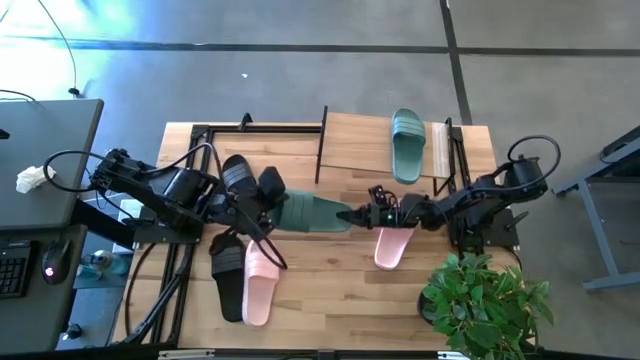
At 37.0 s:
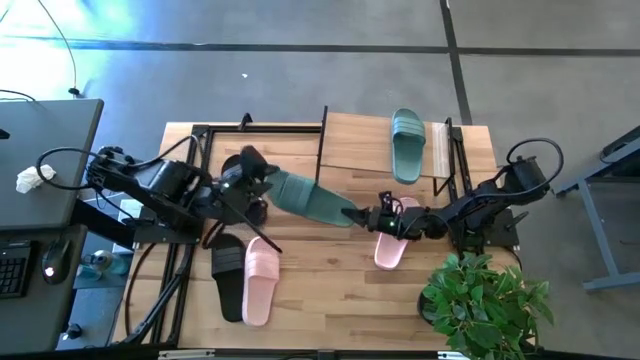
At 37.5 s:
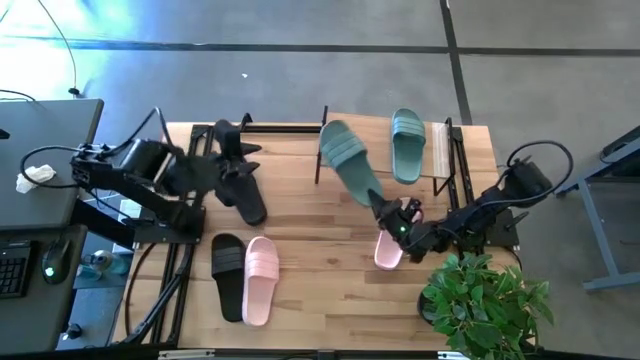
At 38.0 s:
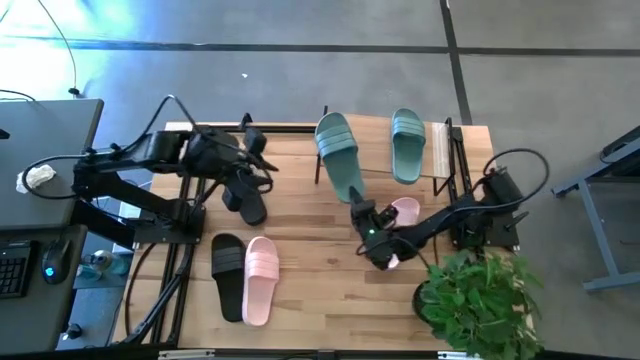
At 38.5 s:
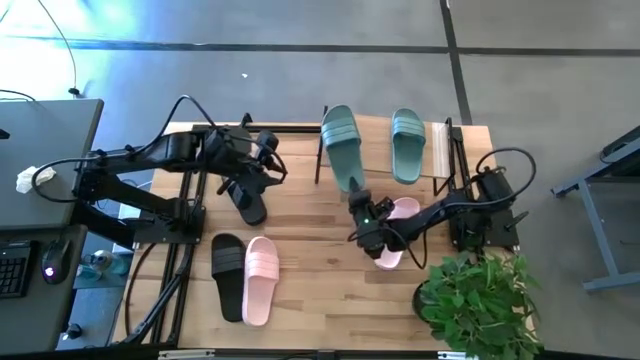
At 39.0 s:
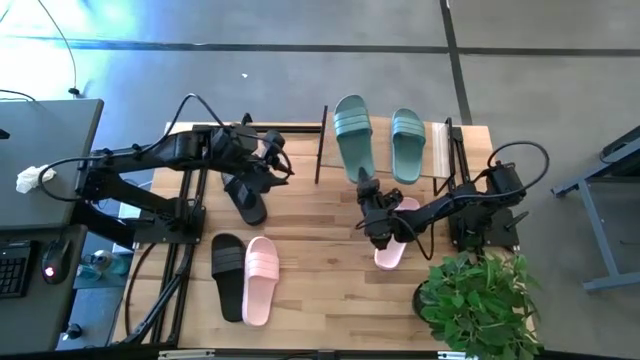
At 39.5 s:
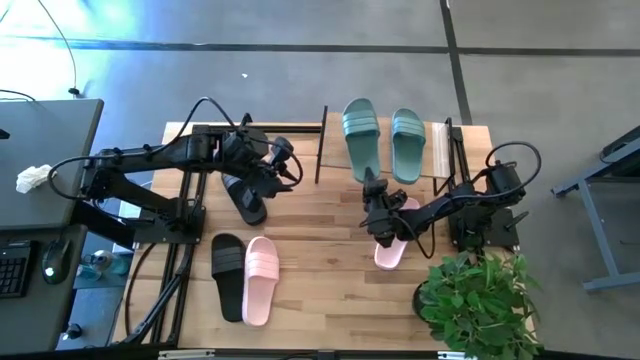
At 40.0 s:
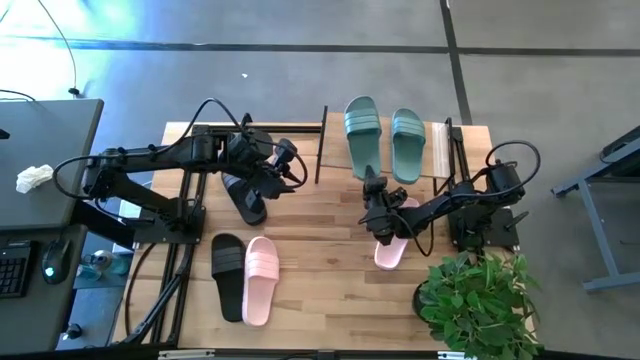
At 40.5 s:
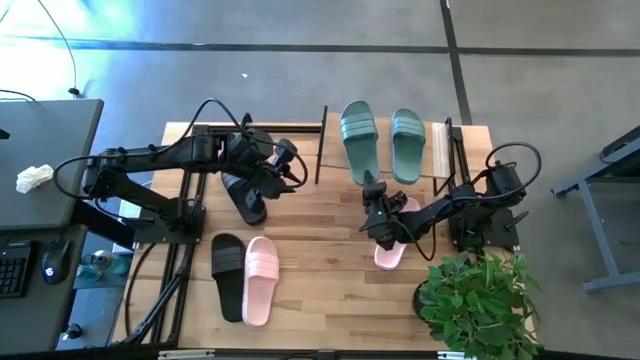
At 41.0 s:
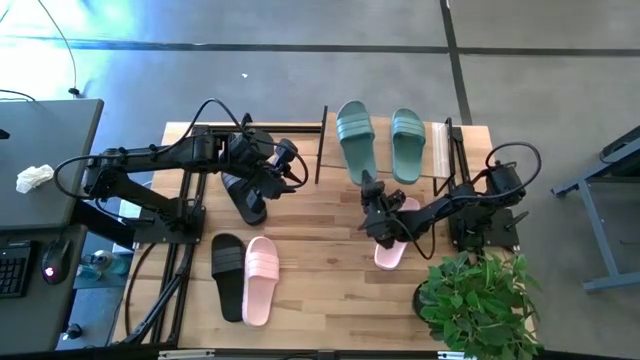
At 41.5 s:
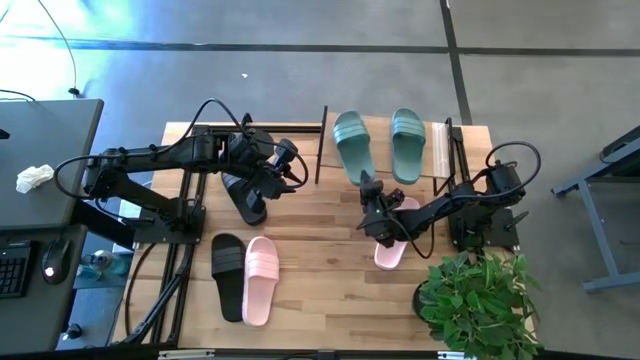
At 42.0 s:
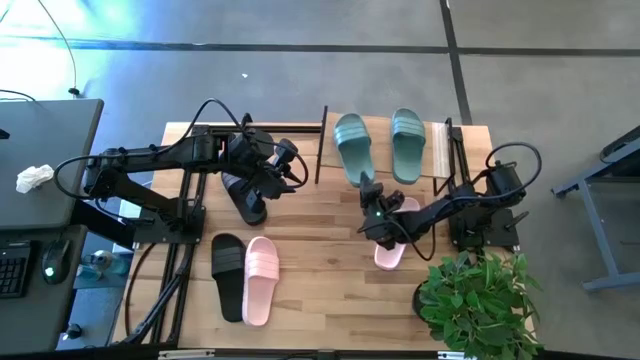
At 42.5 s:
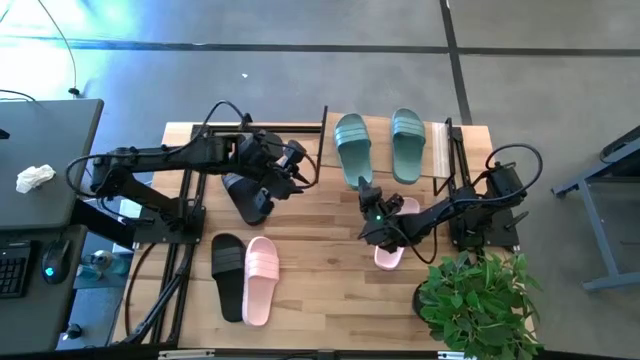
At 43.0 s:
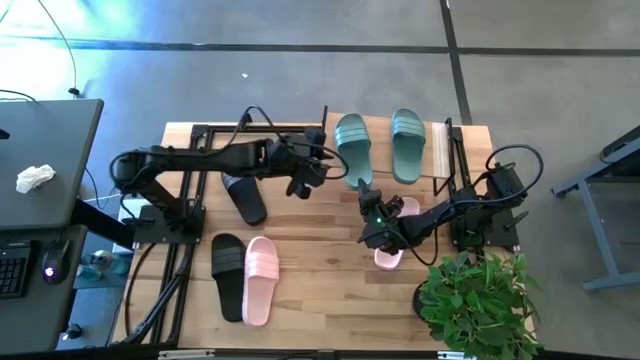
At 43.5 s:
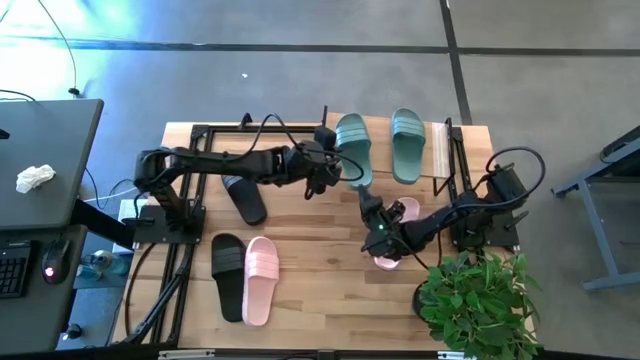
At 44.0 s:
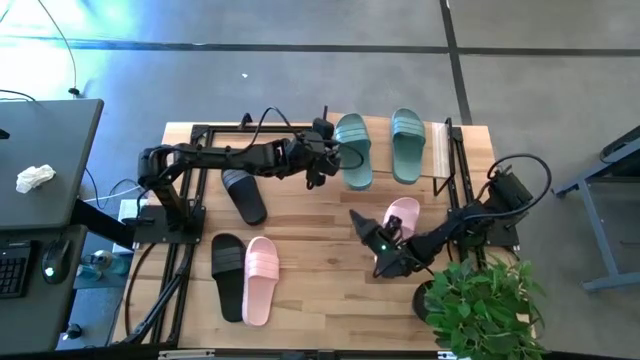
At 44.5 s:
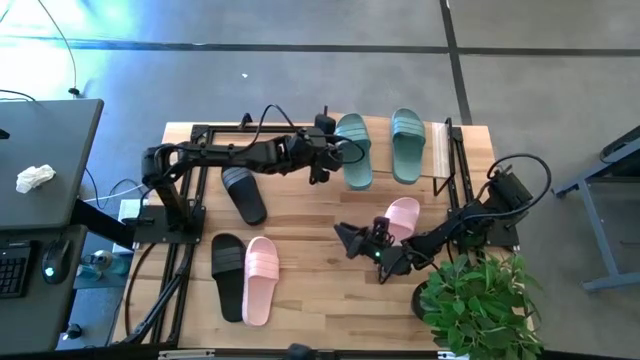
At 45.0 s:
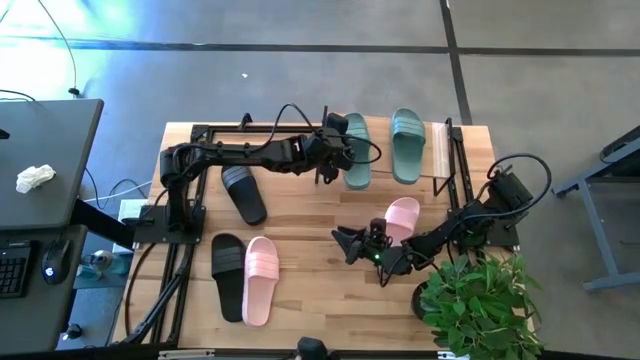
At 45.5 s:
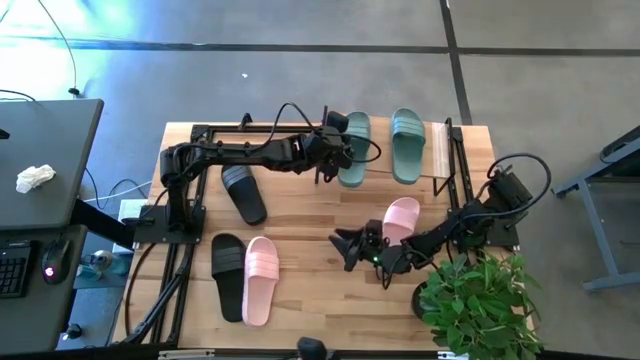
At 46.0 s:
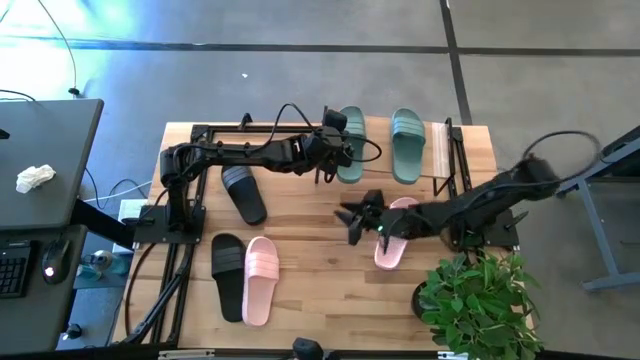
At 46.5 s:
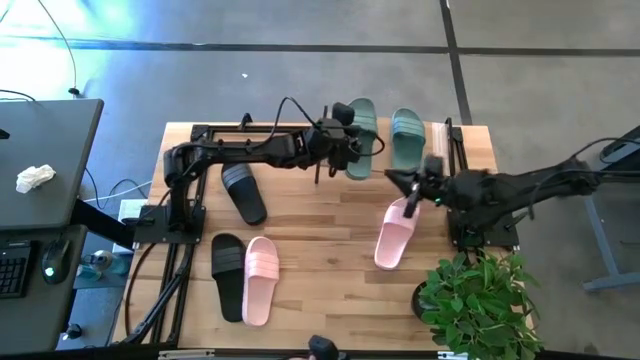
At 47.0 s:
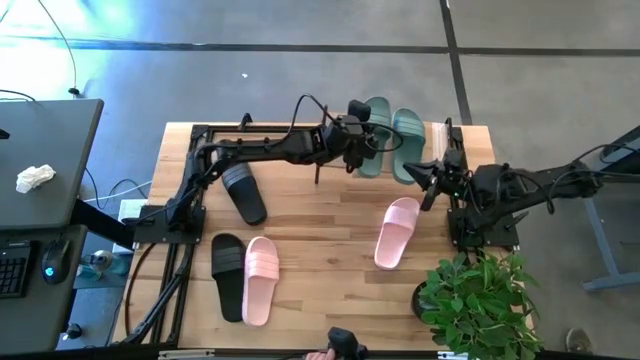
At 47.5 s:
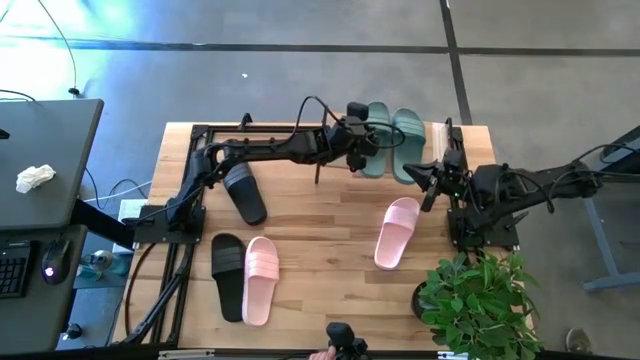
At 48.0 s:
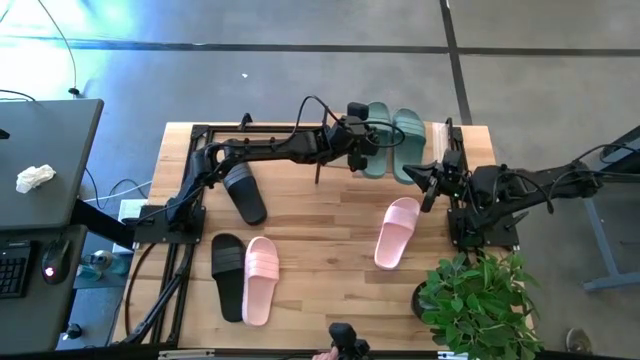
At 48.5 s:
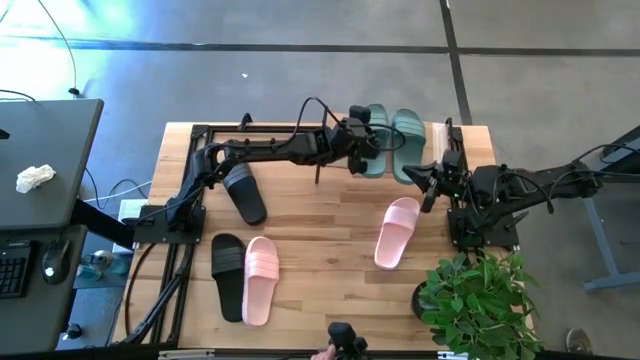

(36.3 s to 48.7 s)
Task: Pick and place slides into the shelf
Put the blue slides on the shelf

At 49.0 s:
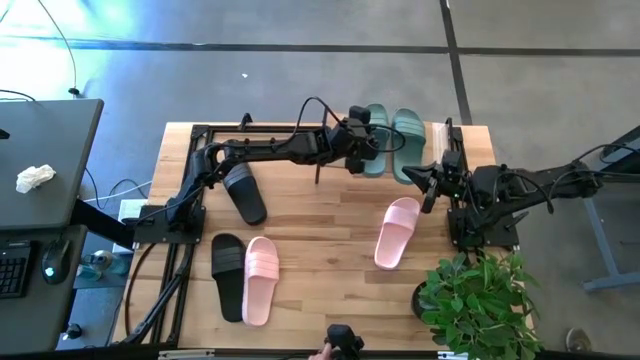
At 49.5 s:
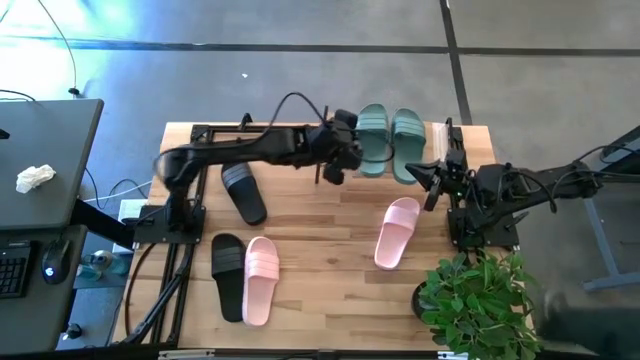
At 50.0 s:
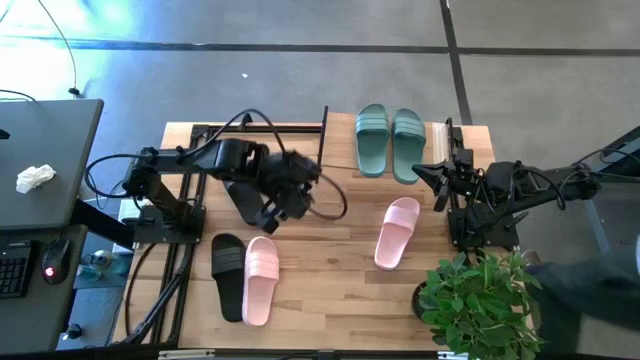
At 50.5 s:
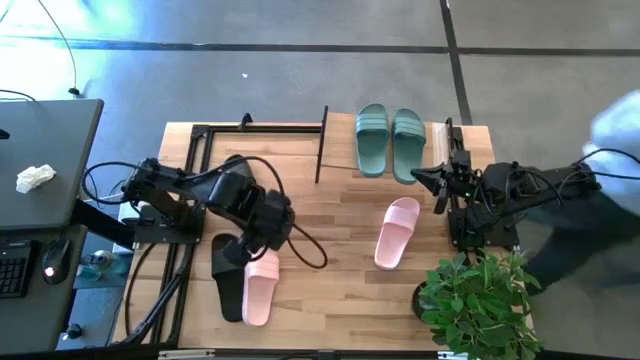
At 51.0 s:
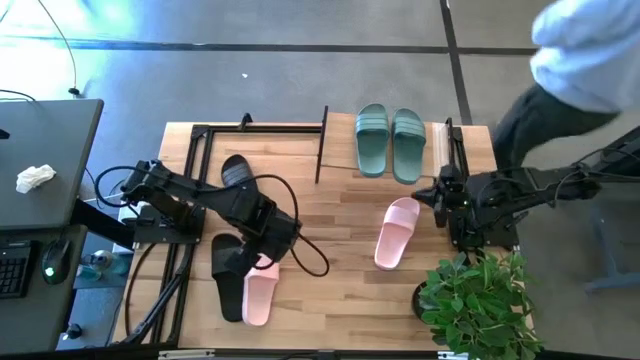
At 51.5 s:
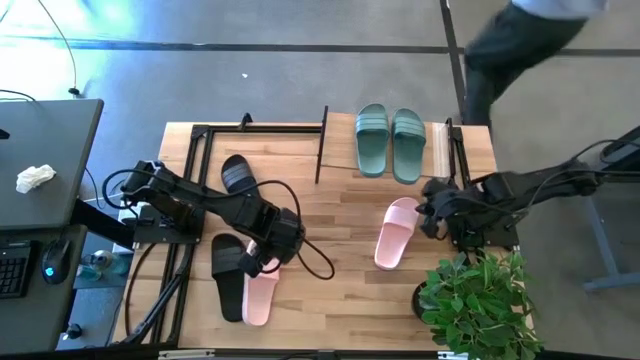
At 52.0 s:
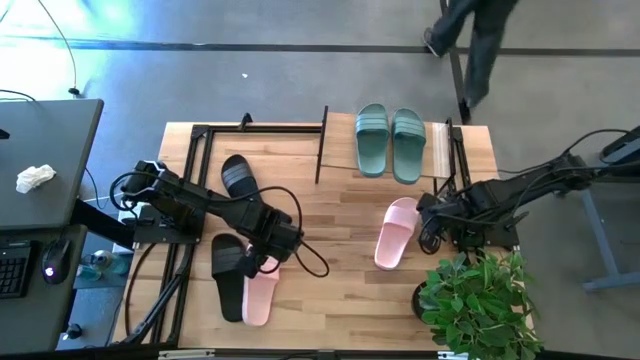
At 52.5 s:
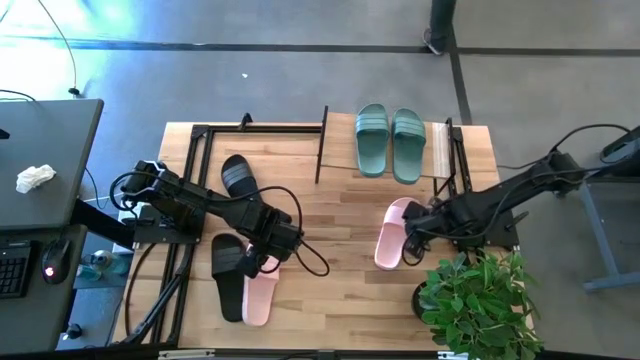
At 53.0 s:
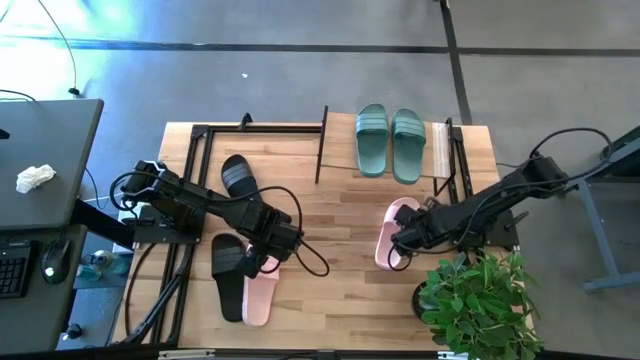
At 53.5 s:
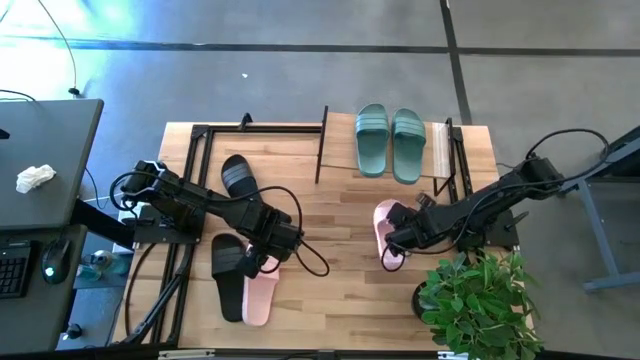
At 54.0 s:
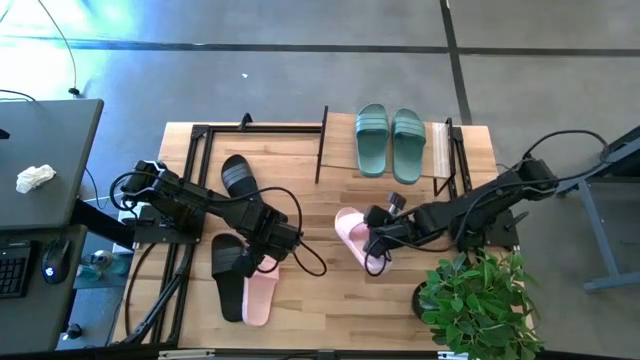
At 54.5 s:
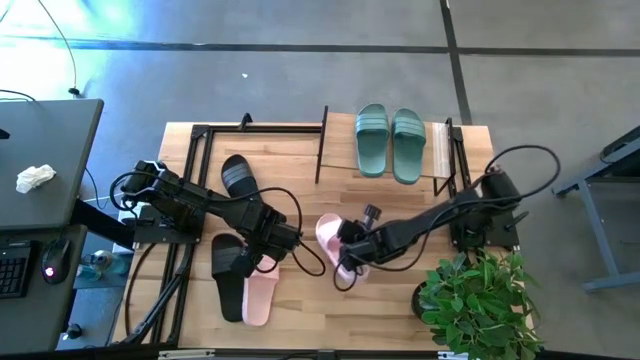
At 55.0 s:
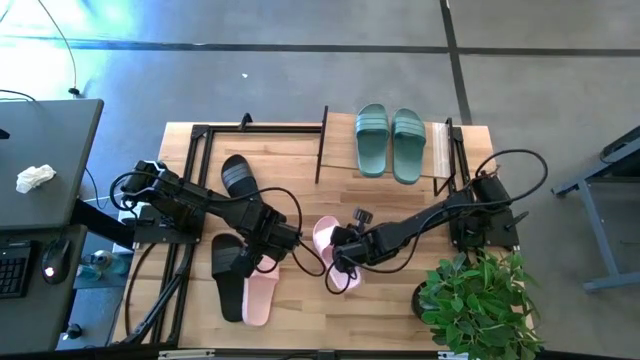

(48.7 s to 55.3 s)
Adjust the right pink slides

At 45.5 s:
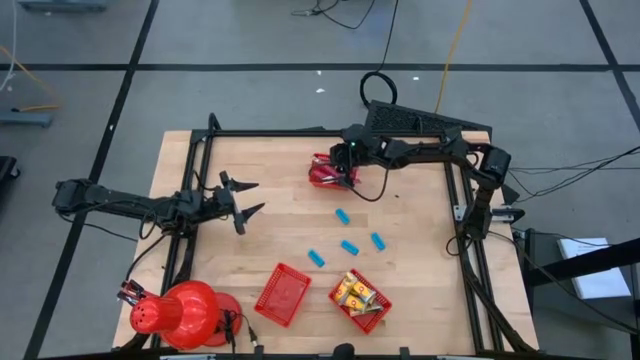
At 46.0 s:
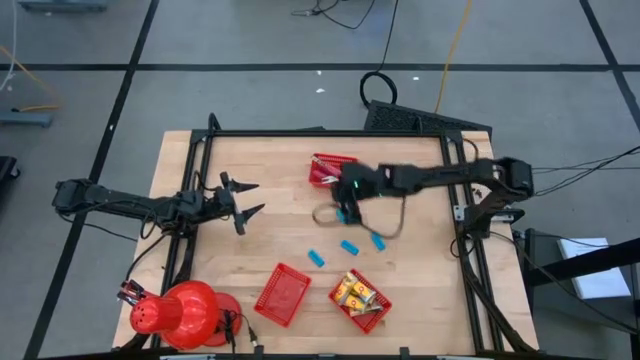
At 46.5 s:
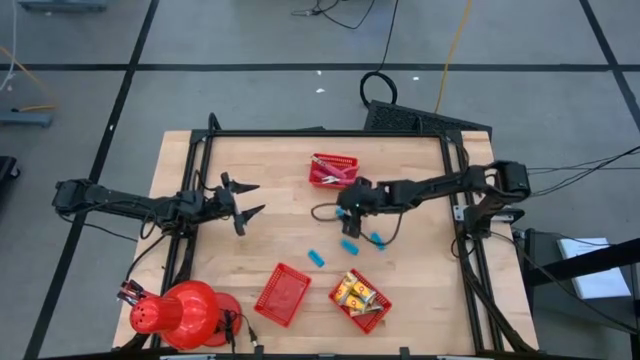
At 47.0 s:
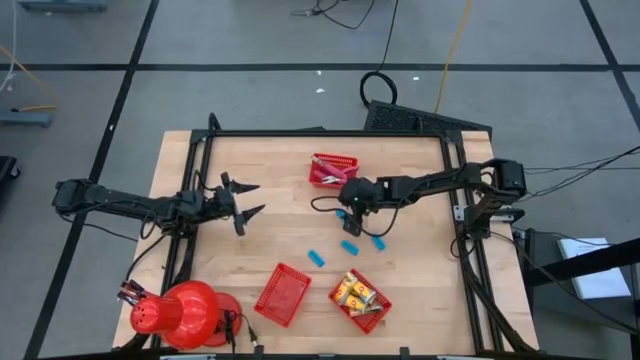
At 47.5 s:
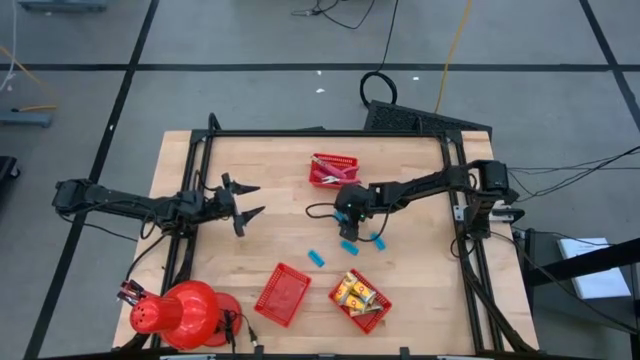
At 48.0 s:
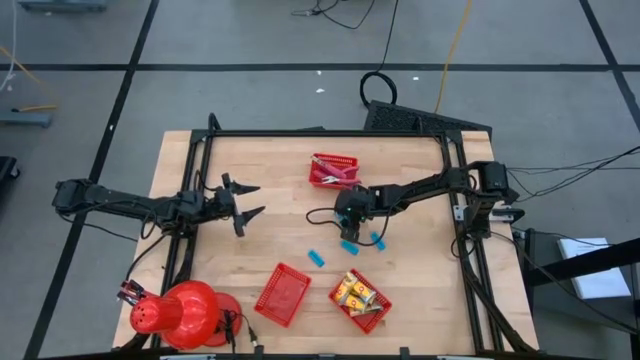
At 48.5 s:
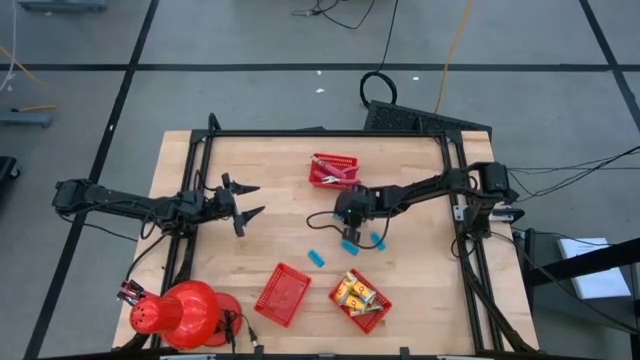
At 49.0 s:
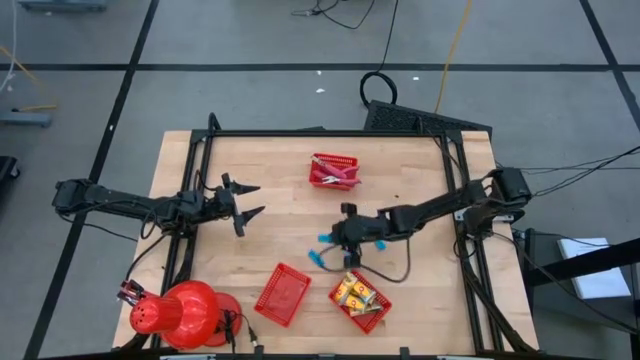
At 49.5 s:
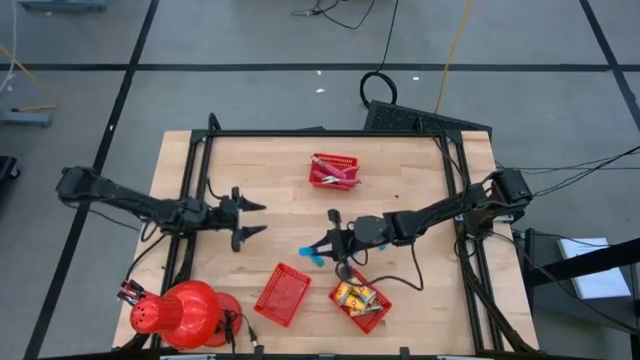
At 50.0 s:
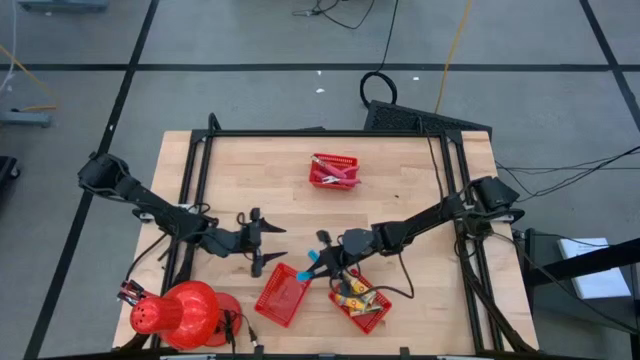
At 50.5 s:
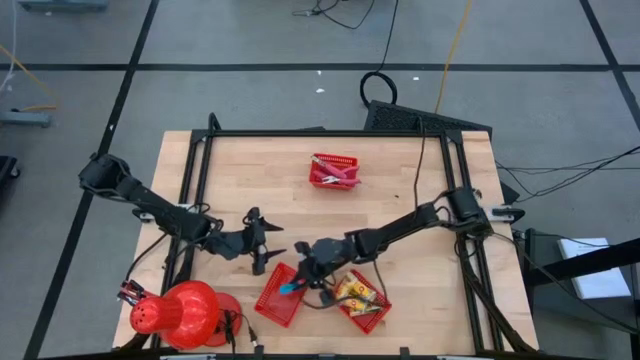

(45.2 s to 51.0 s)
Task: Pick & Place School Supplies
Put the blue eraser into the bottom left red basket
